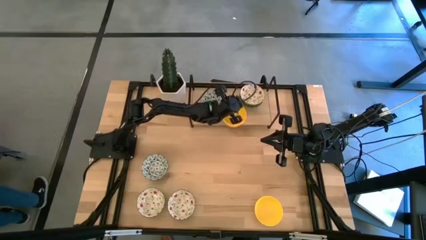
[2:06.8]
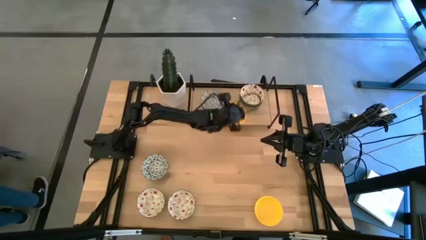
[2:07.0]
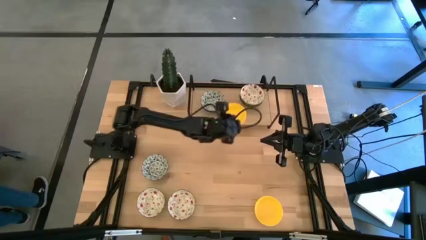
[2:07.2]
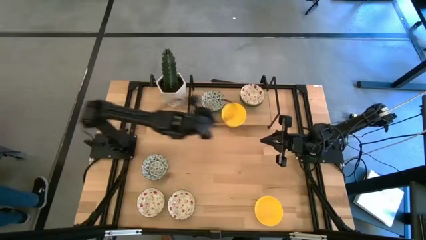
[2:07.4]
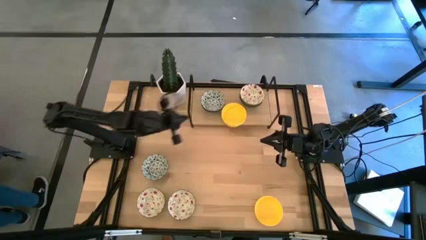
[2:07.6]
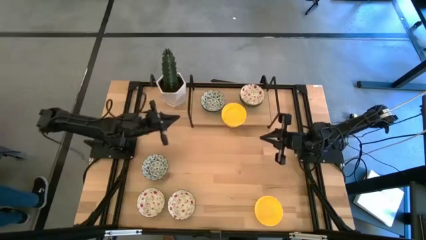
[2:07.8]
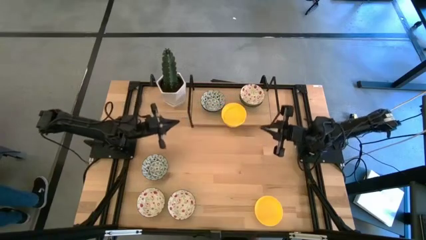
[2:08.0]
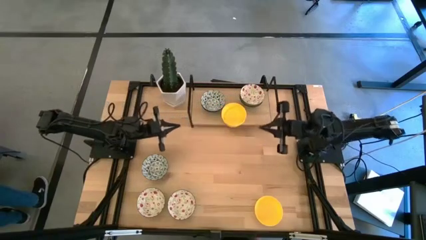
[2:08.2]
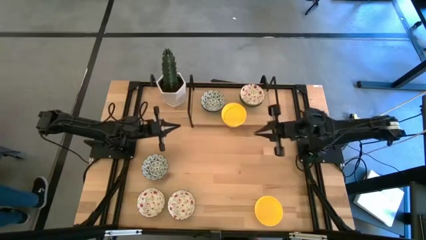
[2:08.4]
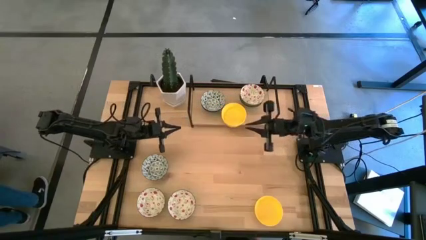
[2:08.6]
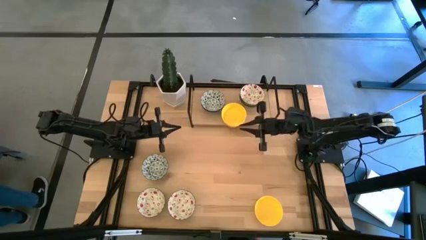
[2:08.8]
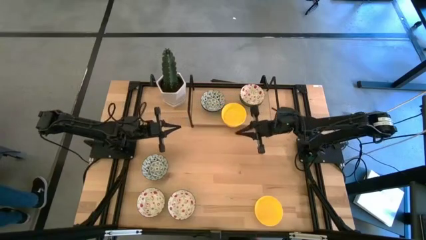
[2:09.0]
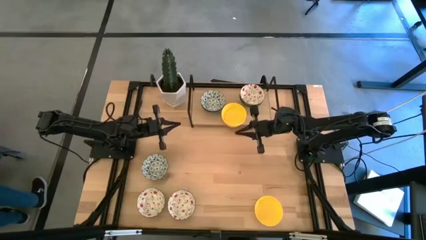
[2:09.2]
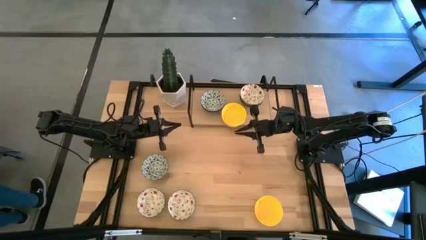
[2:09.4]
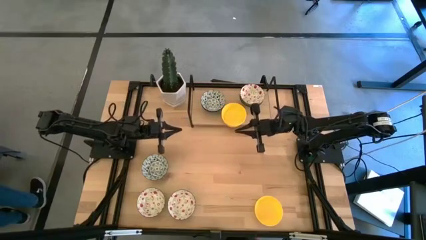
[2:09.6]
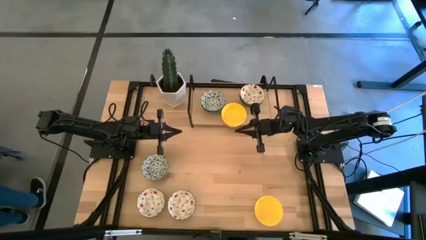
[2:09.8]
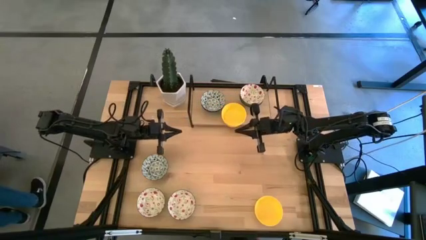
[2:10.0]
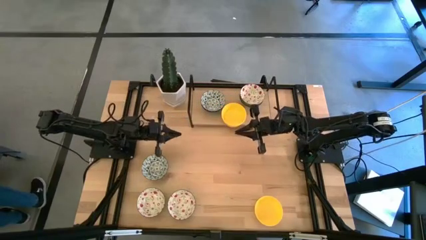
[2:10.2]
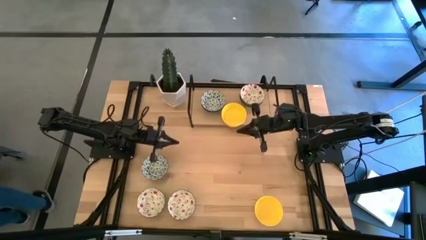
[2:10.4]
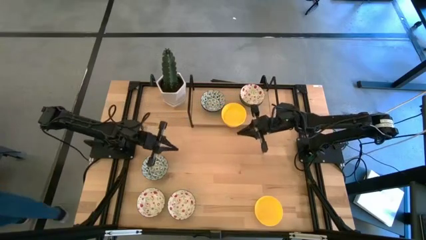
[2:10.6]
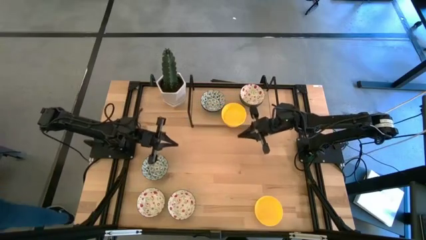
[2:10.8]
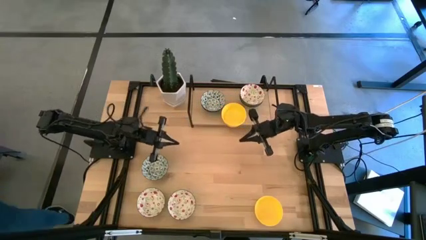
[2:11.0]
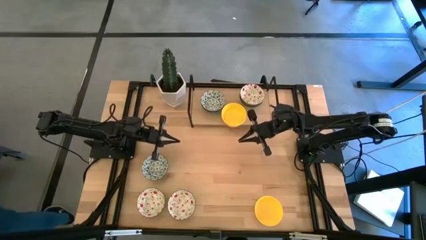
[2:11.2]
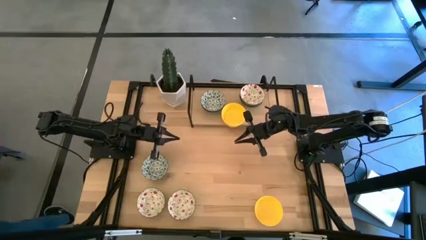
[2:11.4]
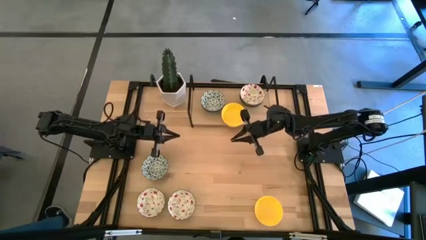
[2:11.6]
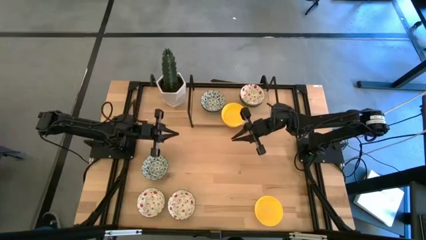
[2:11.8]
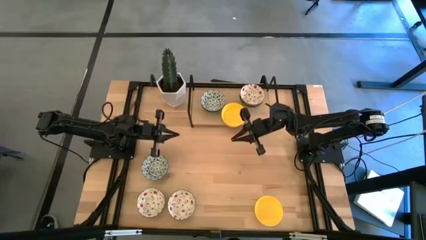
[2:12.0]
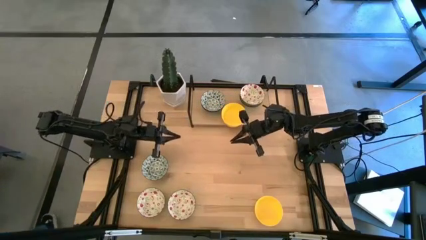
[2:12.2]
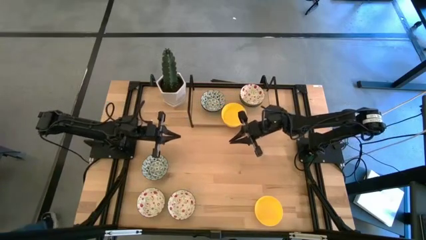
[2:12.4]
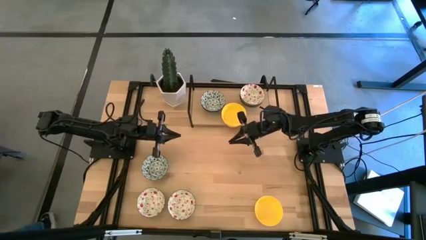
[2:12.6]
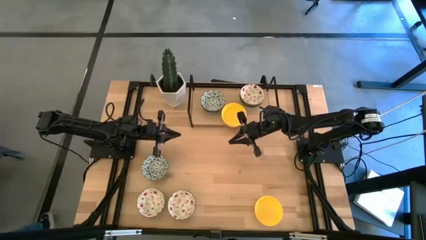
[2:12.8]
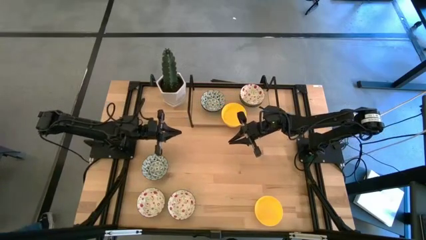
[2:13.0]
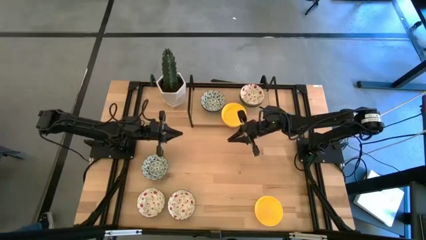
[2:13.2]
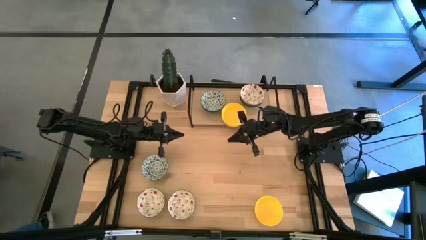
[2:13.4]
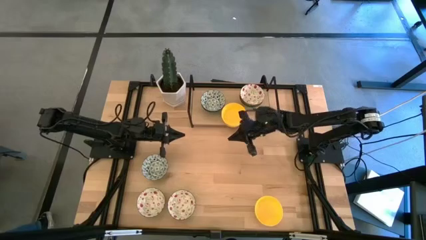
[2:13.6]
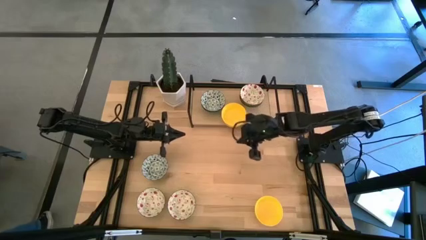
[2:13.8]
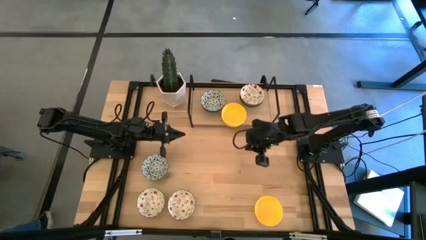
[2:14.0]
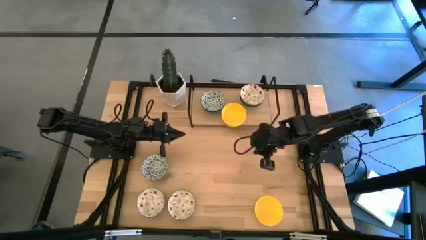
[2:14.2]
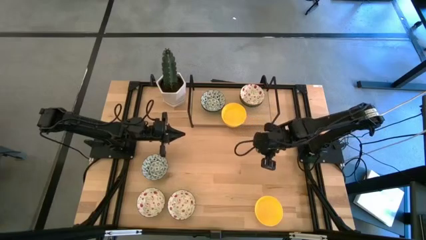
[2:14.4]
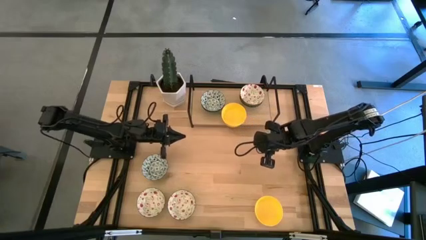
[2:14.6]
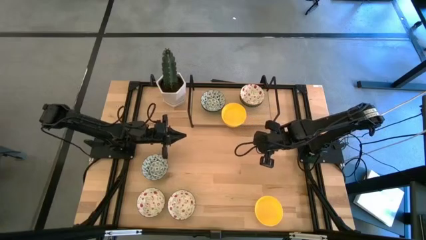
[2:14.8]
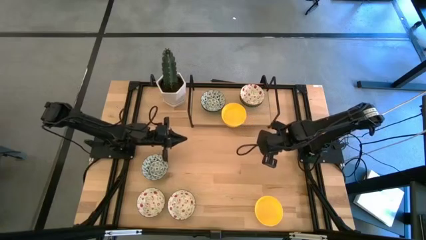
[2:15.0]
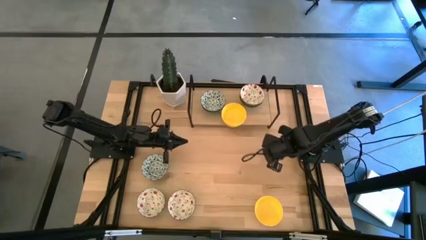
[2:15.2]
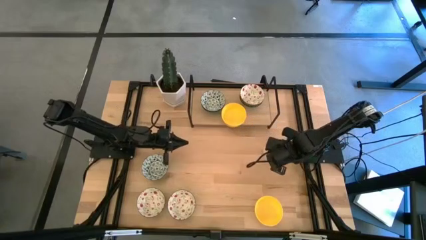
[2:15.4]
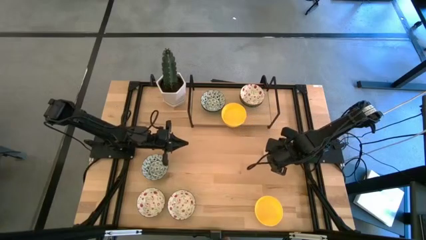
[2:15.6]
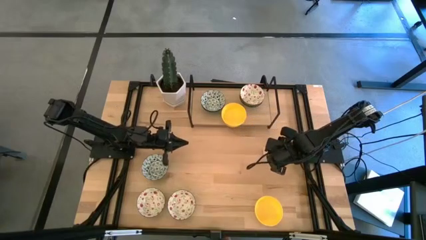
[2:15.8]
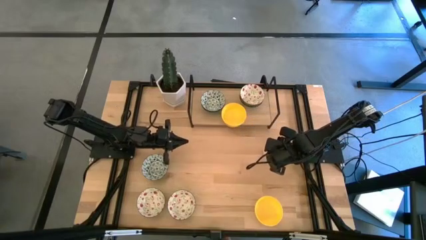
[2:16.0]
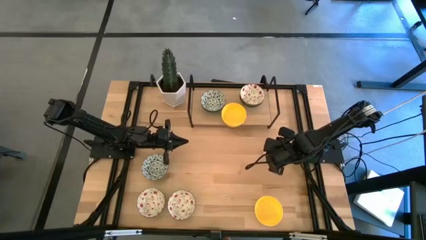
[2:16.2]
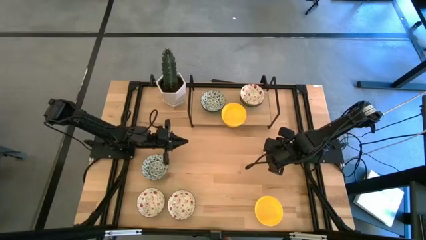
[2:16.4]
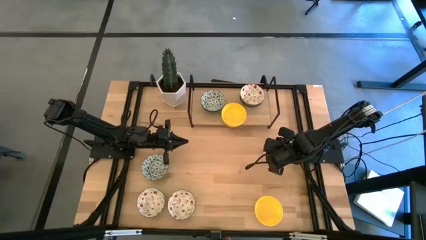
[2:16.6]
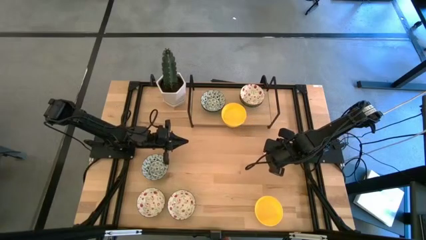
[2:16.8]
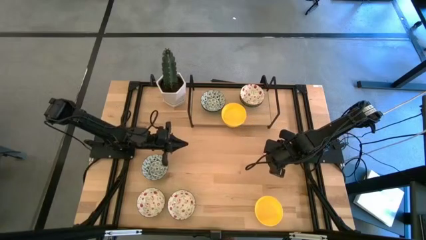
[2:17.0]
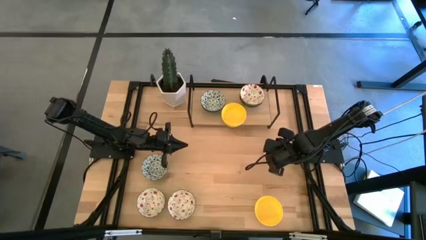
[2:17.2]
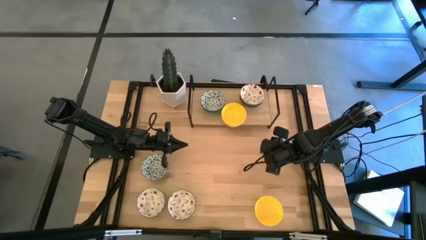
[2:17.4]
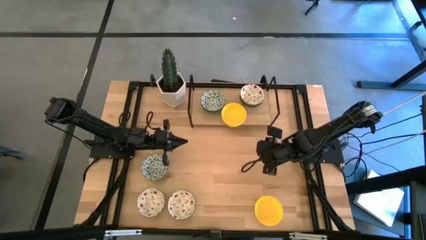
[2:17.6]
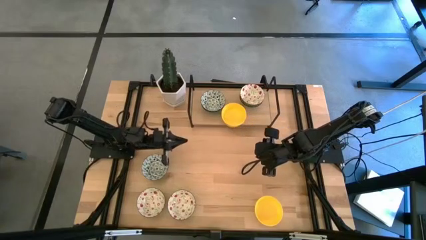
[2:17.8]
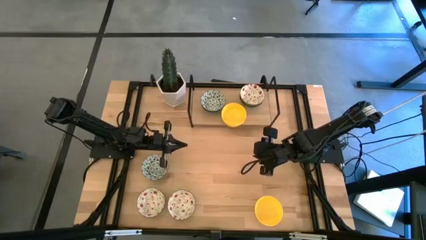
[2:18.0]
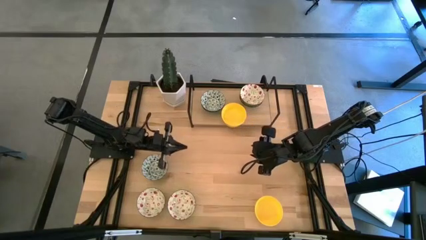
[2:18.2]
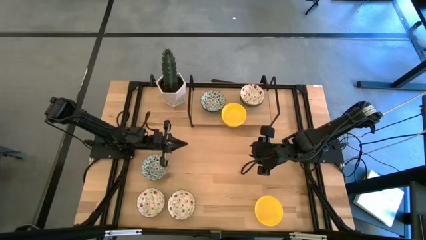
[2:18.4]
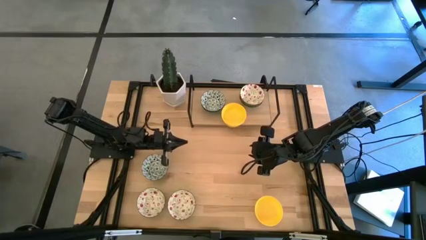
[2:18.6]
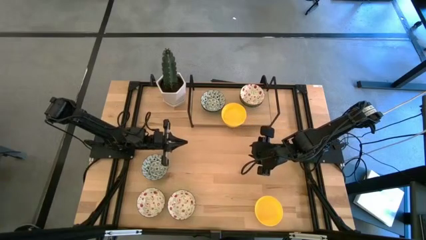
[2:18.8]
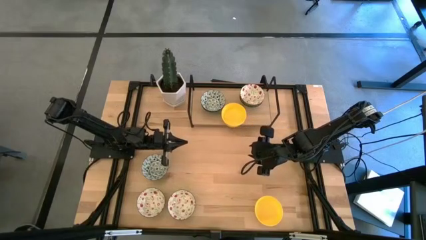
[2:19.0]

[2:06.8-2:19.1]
Task: Pick & Place Mini bowls
Stack the yellow bowl on top of the yellow bowl on the shelf

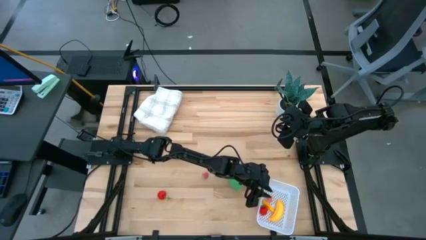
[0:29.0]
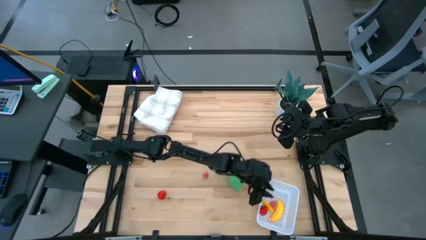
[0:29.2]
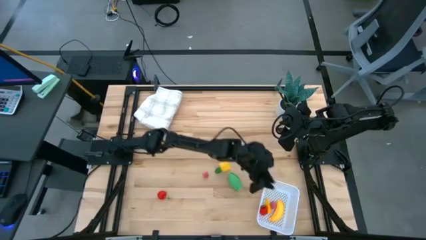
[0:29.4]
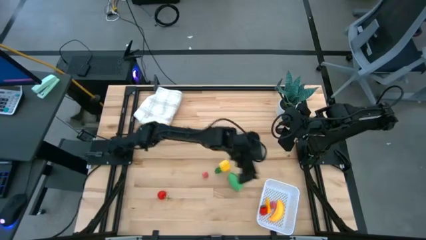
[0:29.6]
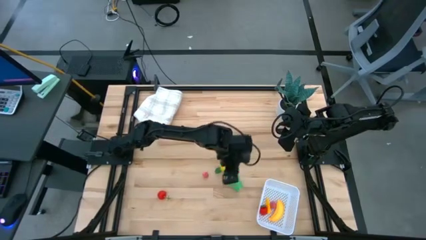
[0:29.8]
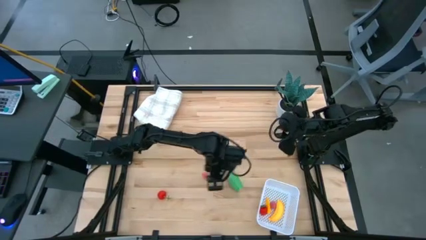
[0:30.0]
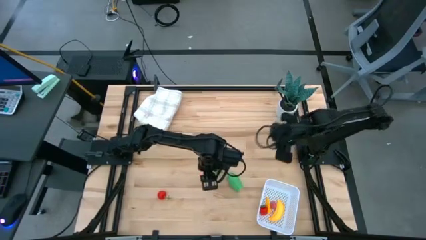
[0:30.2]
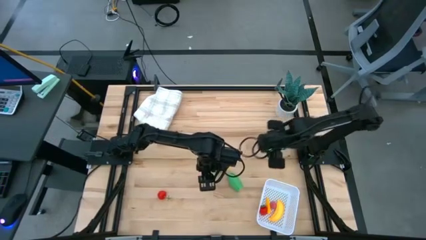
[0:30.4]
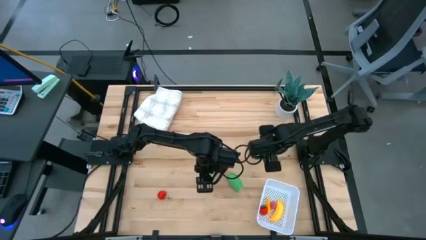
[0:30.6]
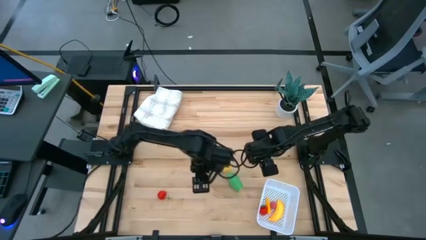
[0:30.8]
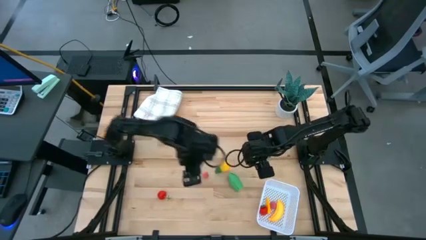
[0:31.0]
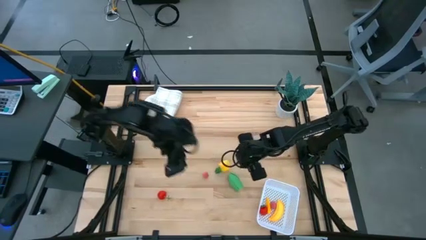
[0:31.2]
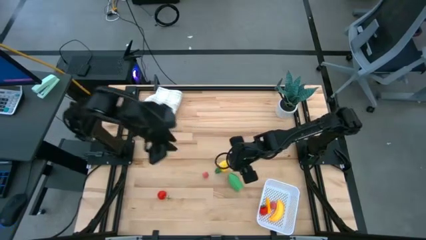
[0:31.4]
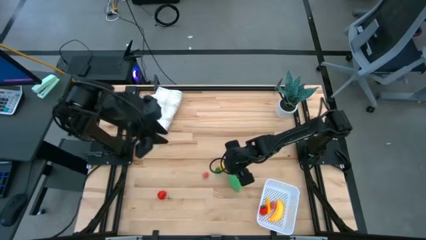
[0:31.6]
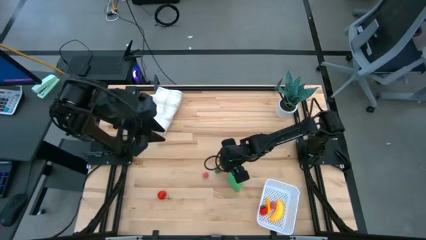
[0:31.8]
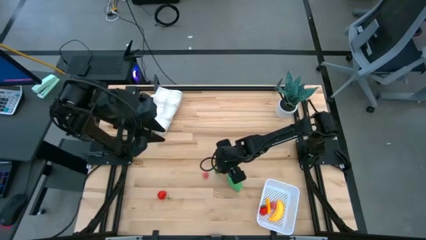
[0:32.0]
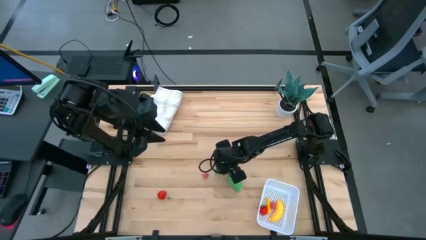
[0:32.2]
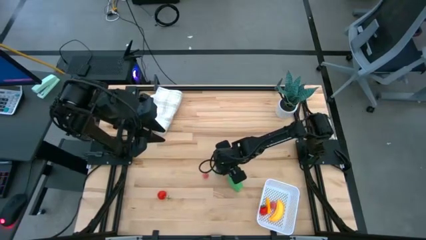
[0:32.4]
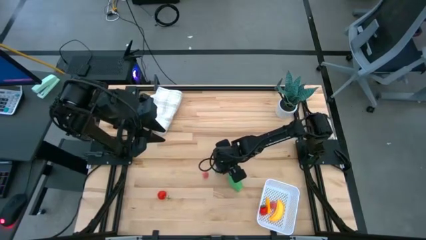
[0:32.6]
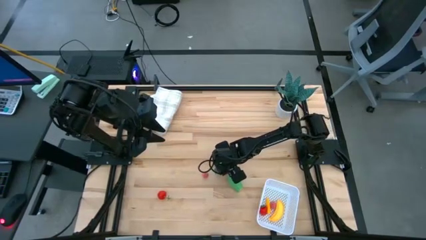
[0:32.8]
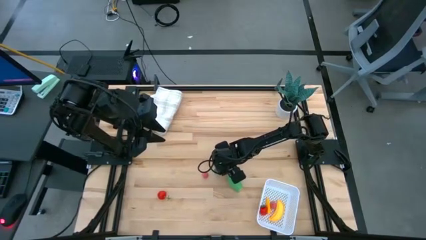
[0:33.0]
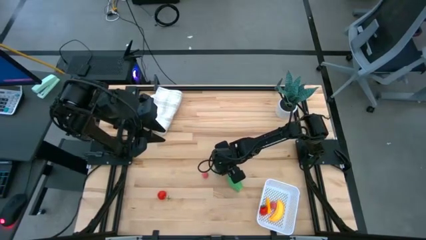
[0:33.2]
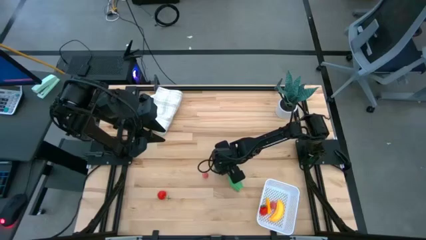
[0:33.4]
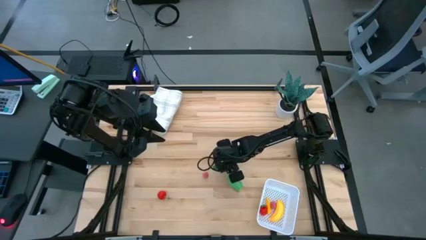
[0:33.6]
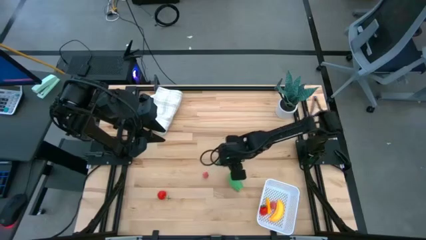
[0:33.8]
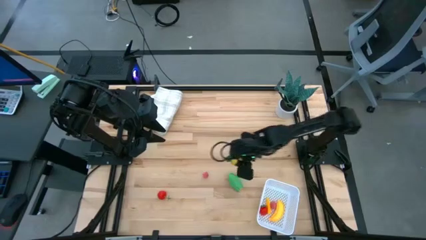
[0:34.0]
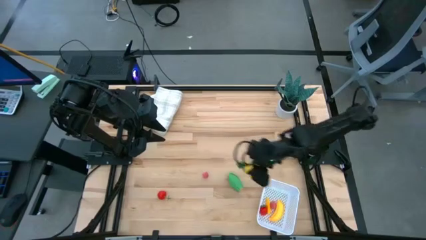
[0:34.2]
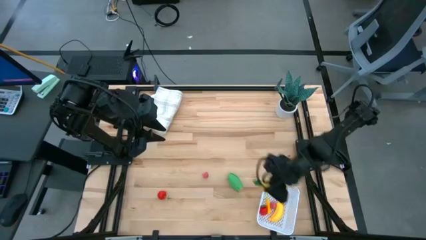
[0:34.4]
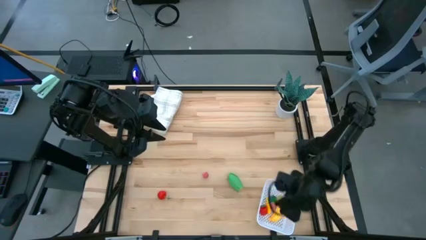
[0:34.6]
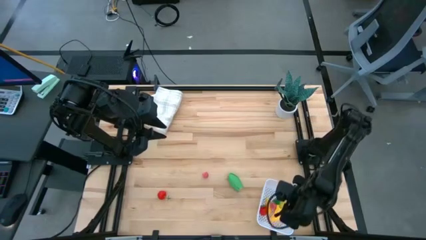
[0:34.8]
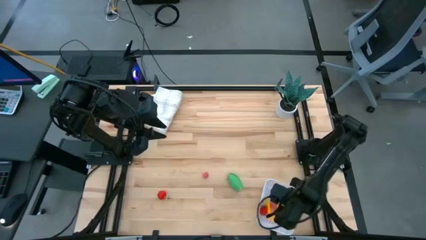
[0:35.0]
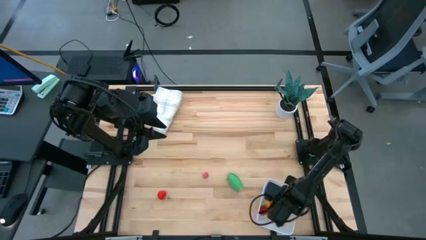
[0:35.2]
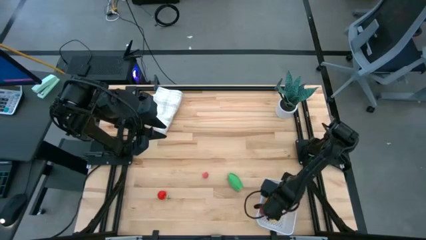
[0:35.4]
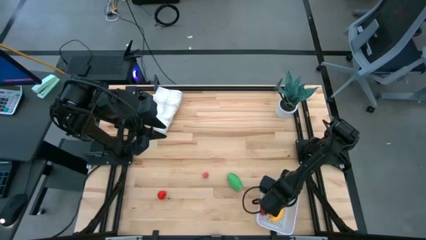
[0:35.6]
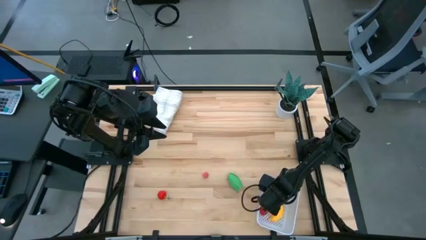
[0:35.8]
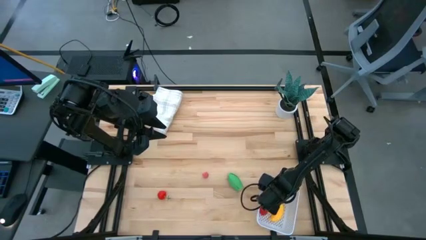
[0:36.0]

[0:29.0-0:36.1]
Task: Pick and placing Produce into tupperware
Put the yellow pineapple into the white basket
